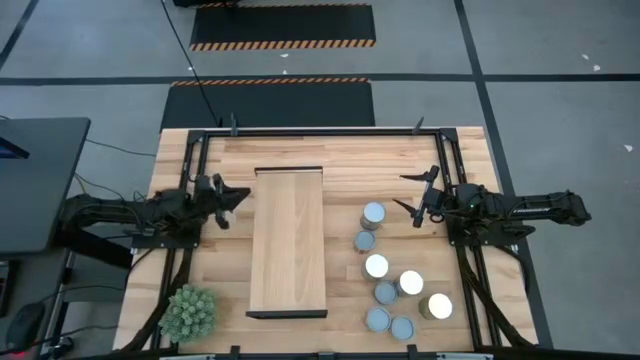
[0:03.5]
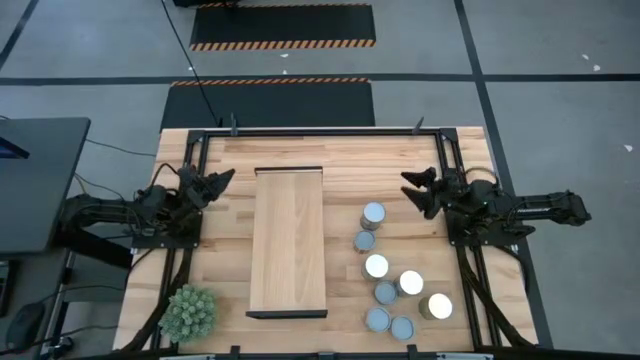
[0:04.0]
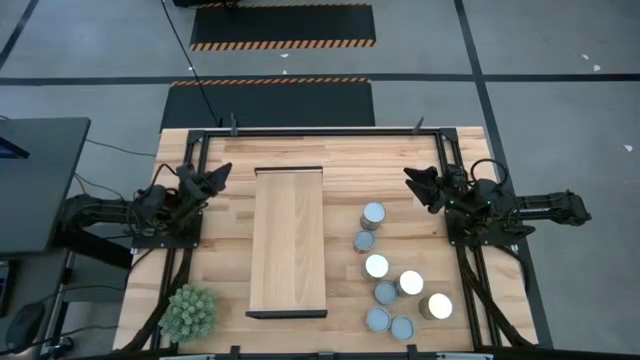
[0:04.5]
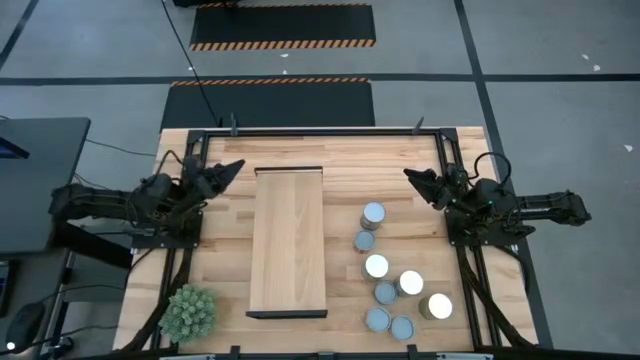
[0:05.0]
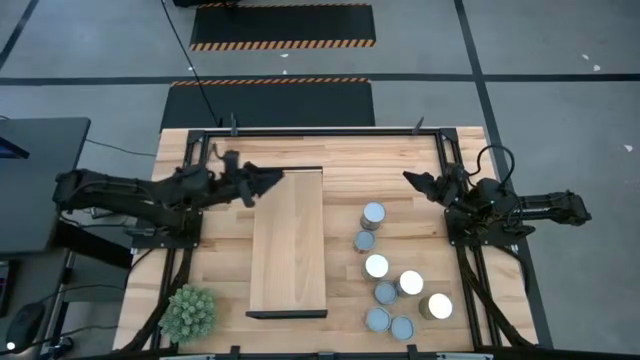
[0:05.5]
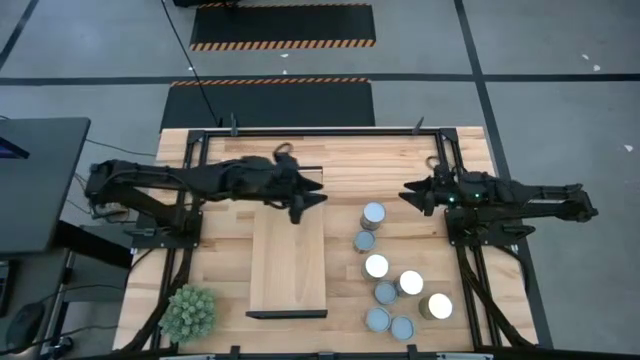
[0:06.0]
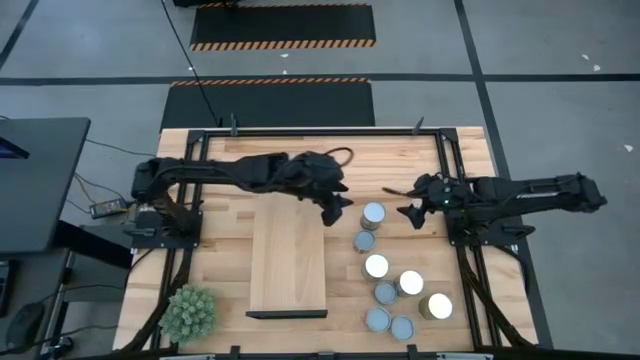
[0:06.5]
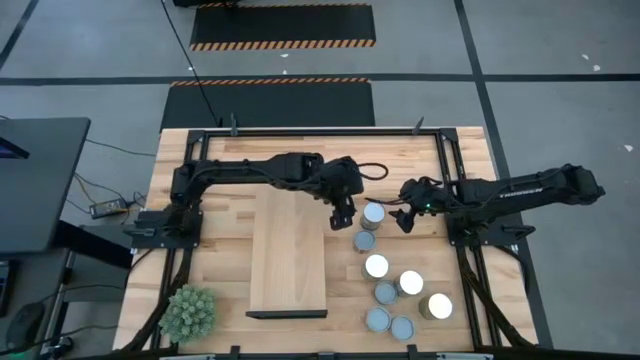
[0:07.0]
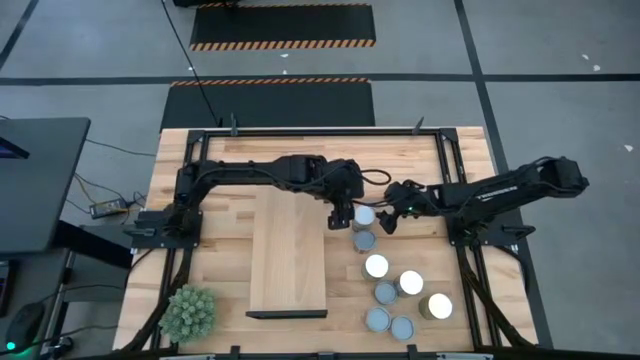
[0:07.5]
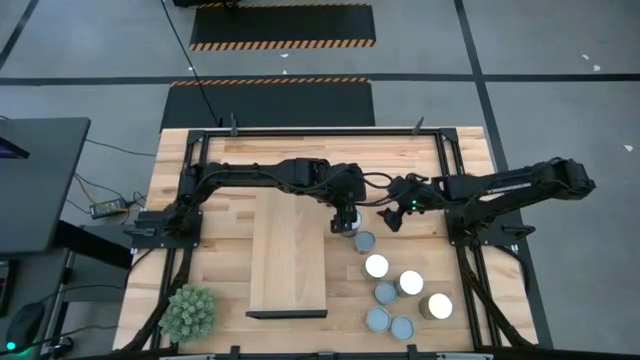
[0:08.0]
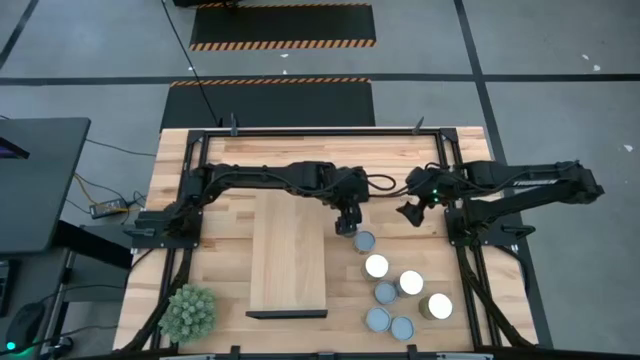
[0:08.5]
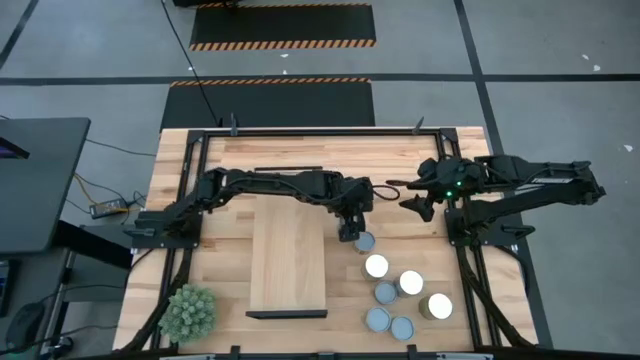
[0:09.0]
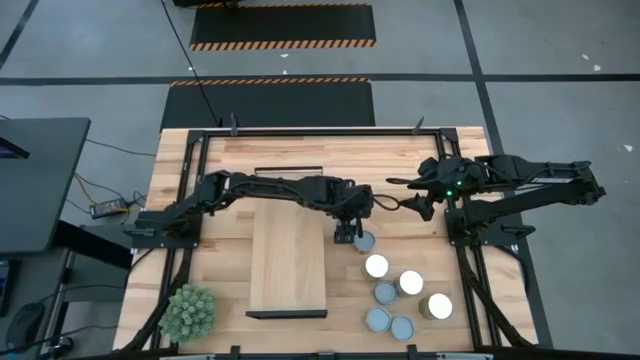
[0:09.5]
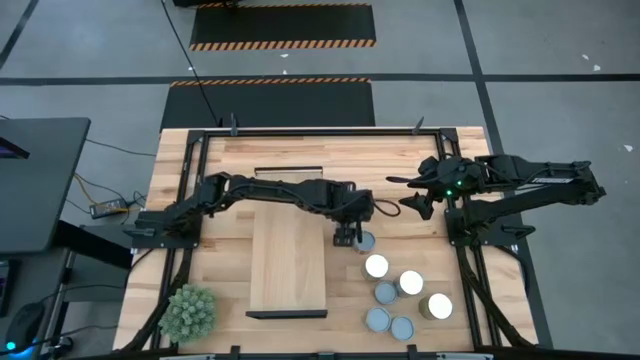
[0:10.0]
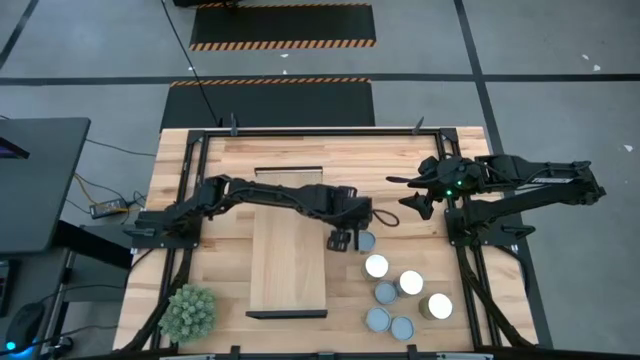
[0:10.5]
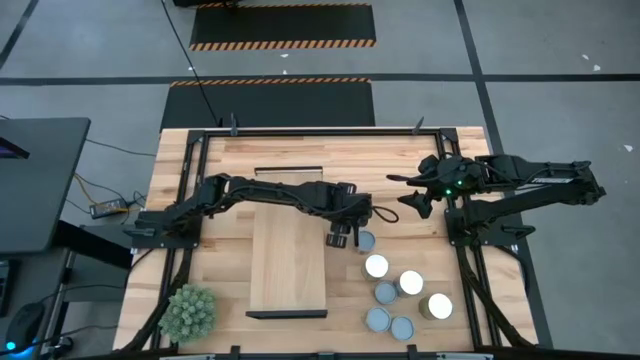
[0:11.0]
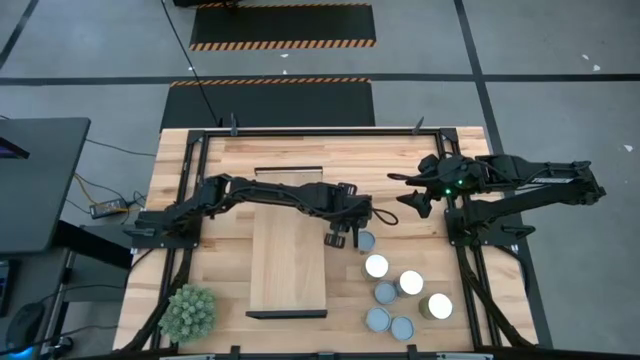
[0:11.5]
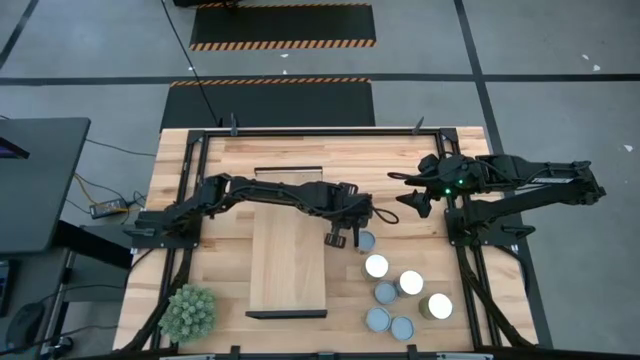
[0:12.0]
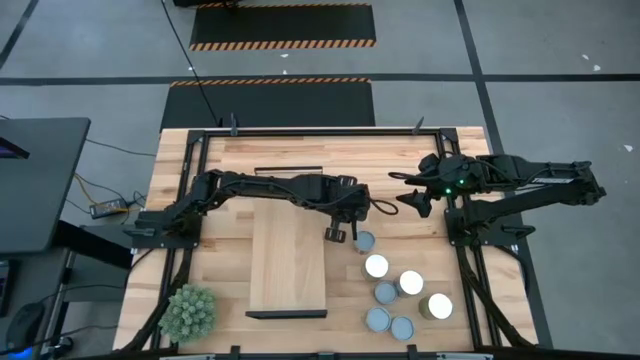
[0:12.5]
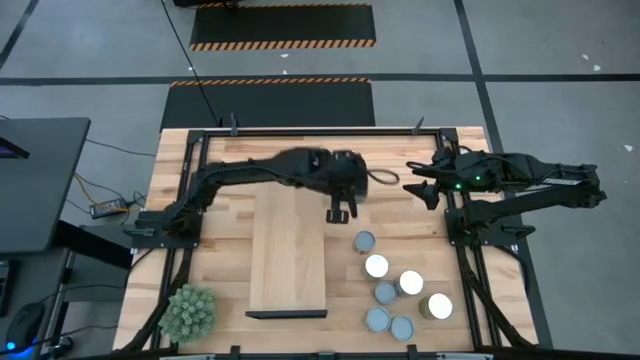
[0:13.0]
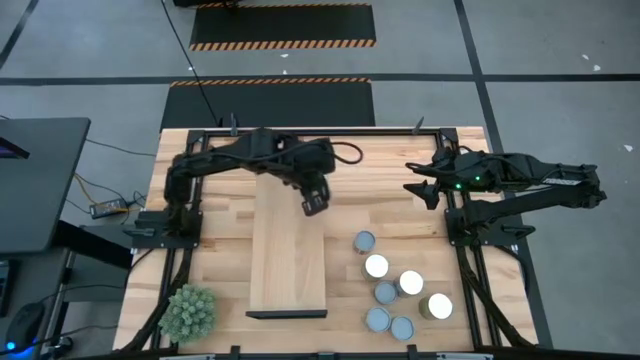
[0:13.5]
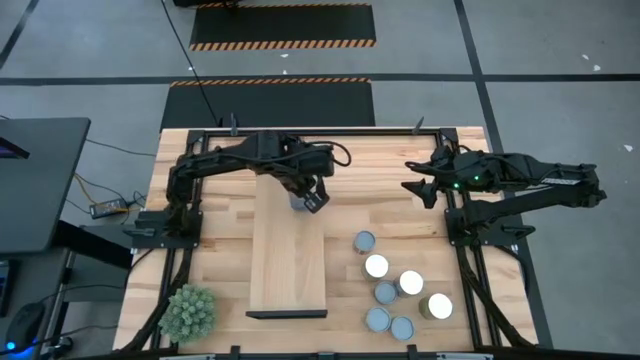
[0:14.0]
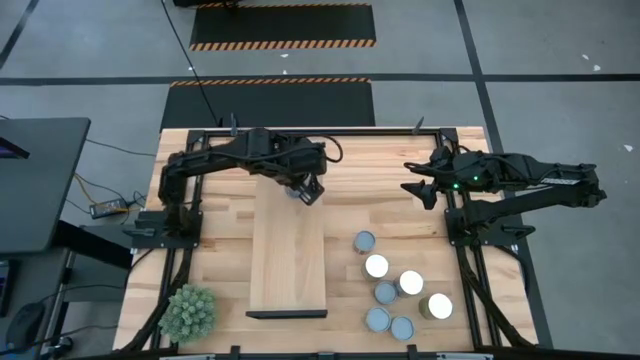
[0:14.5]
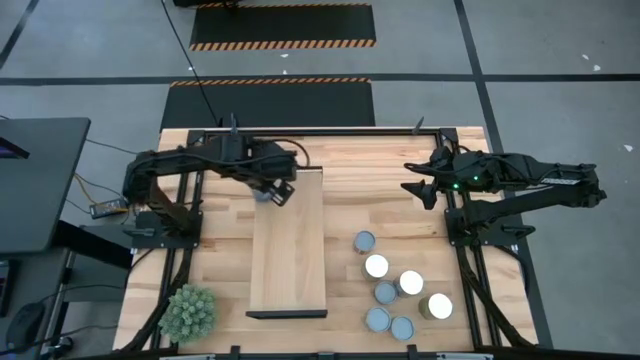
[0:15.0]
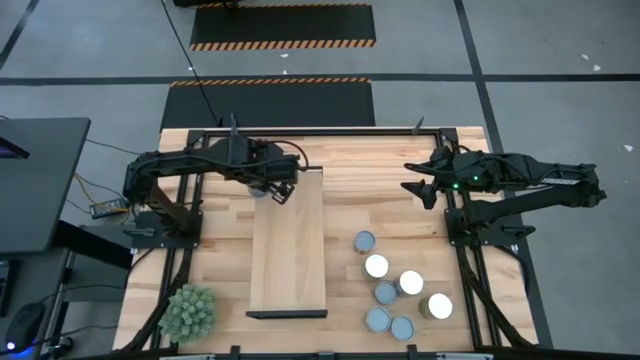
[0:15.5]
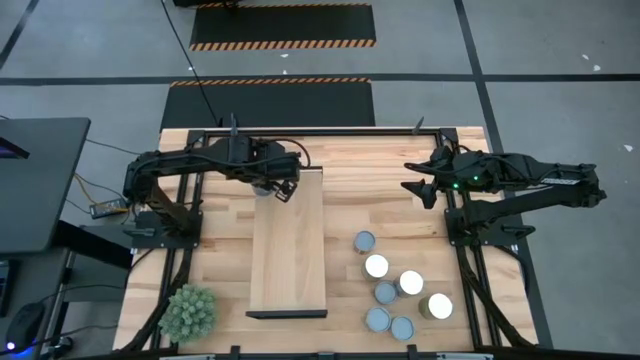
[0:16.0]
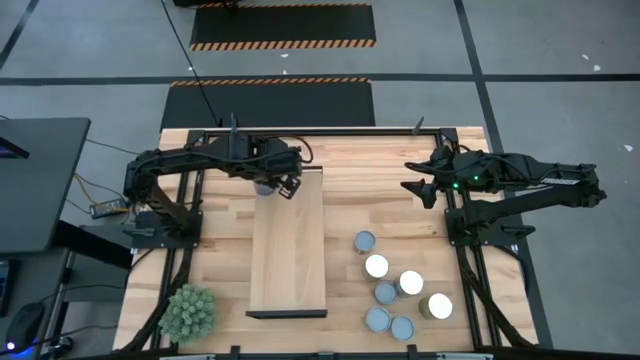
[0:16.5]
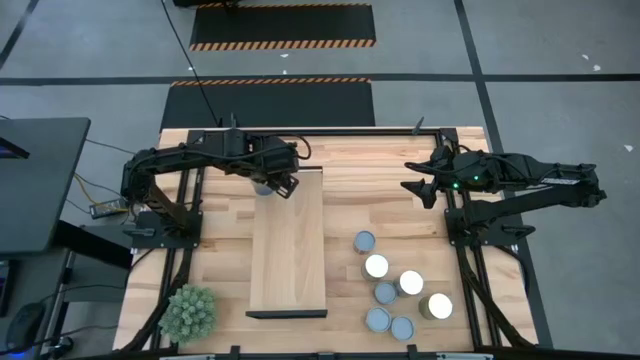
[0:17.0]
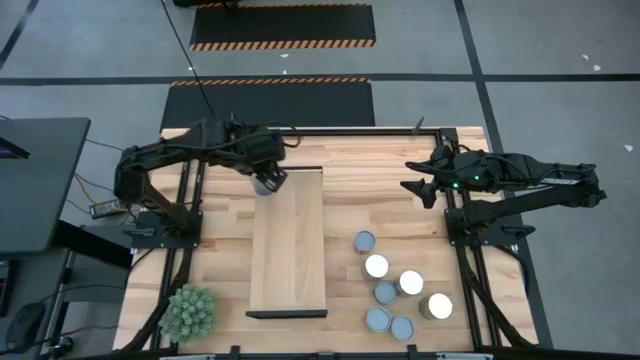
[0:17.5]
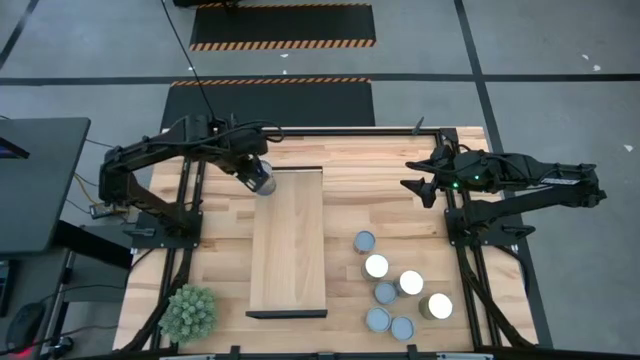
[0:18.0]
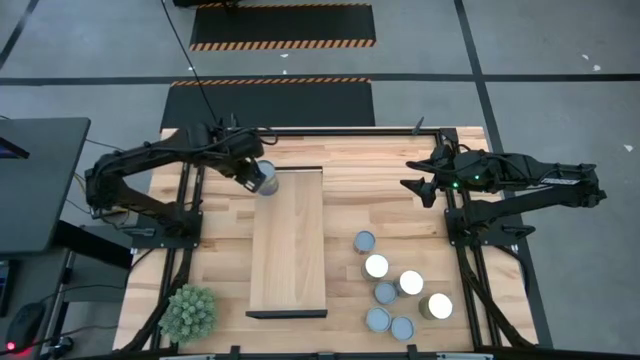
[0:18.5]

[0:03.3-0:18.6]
Task: Pick and place cans onto a shelf
Put the canned peas on the shelf

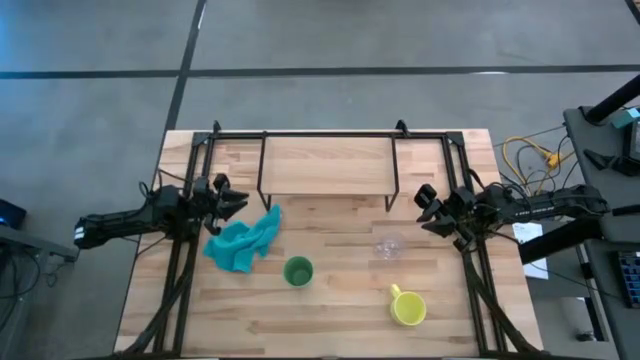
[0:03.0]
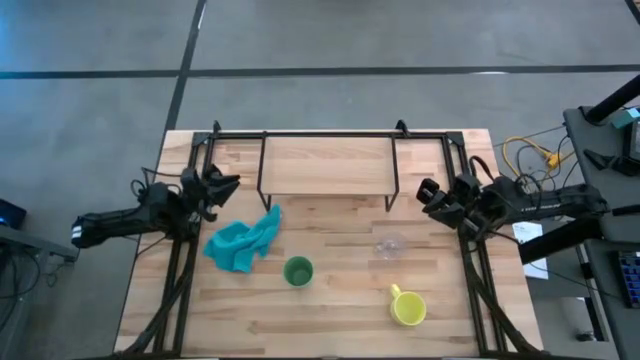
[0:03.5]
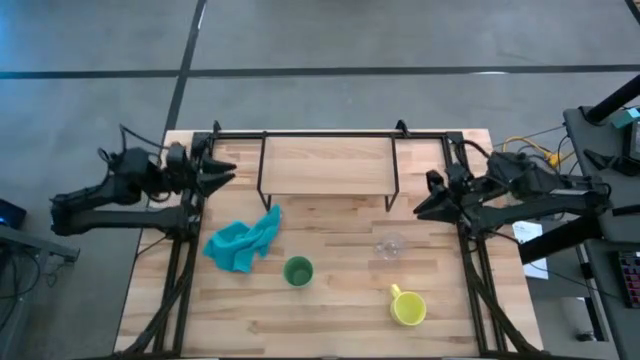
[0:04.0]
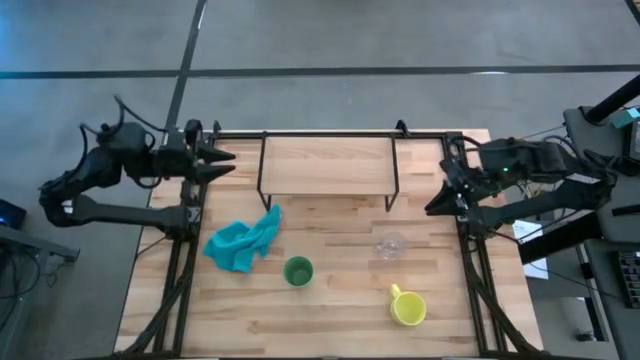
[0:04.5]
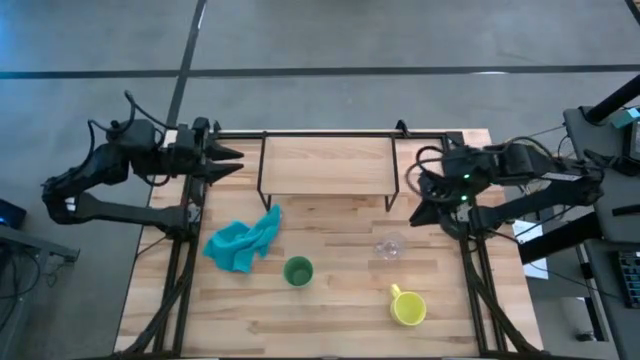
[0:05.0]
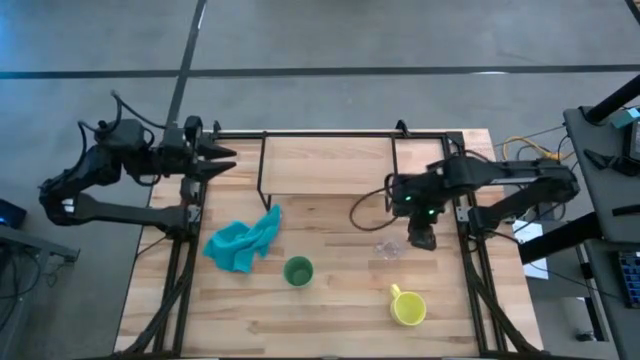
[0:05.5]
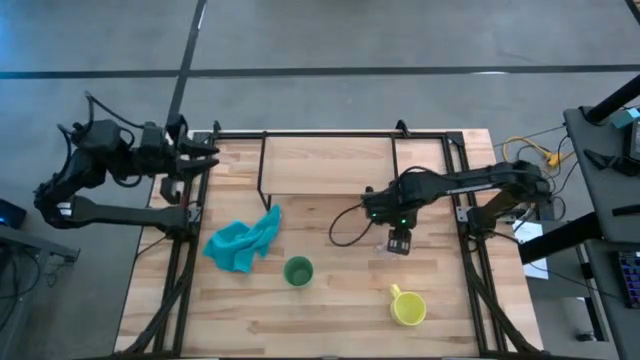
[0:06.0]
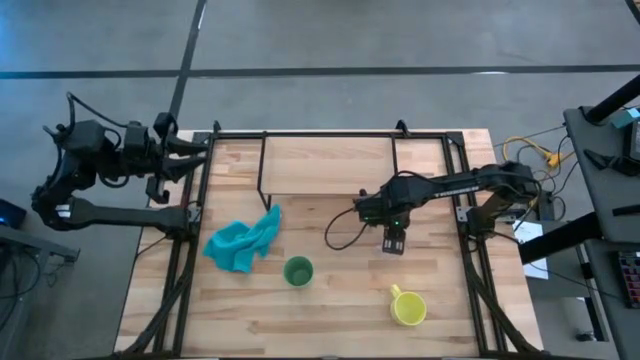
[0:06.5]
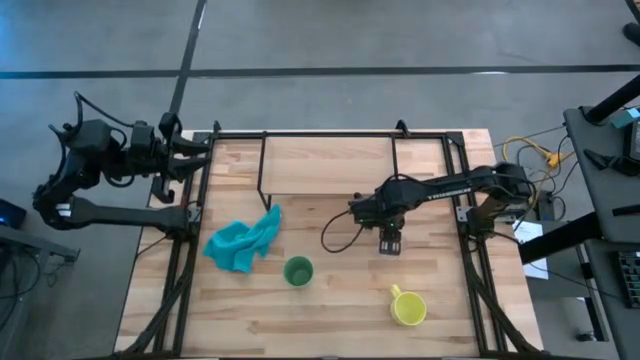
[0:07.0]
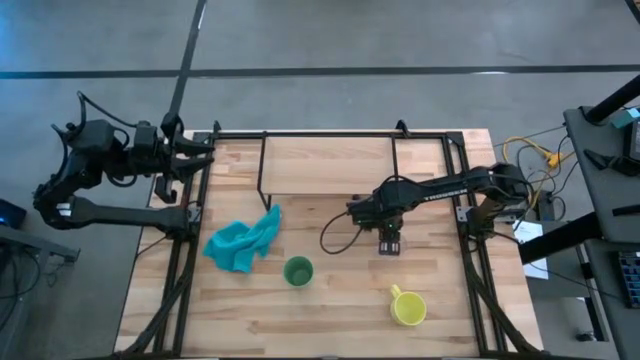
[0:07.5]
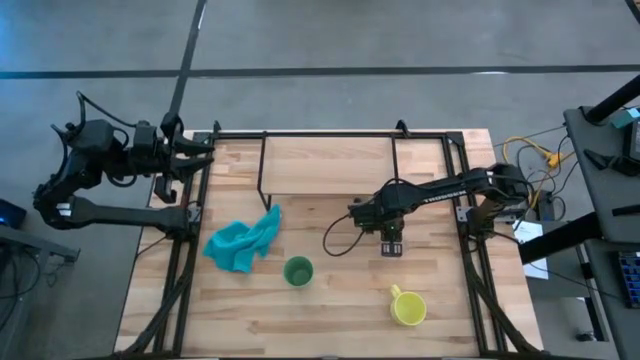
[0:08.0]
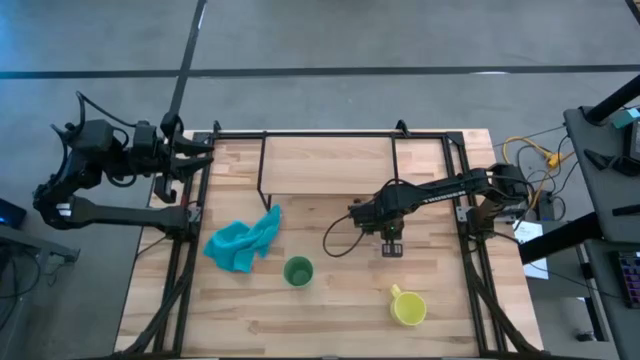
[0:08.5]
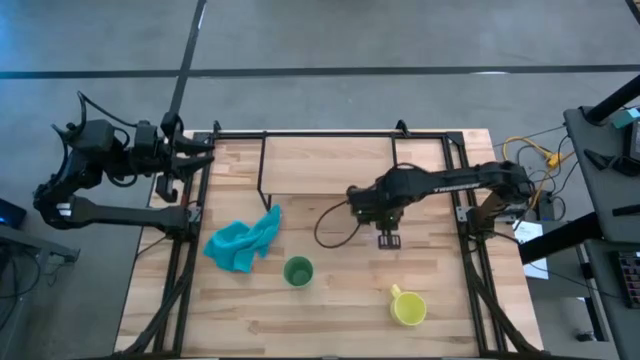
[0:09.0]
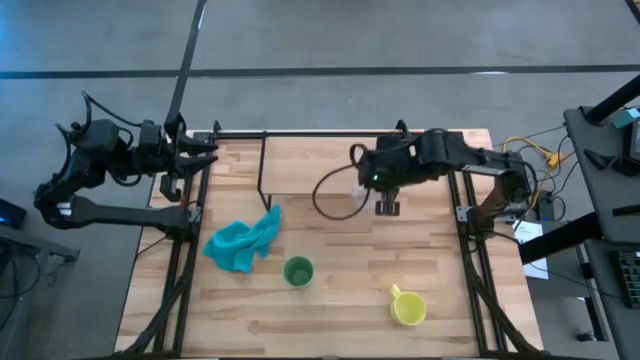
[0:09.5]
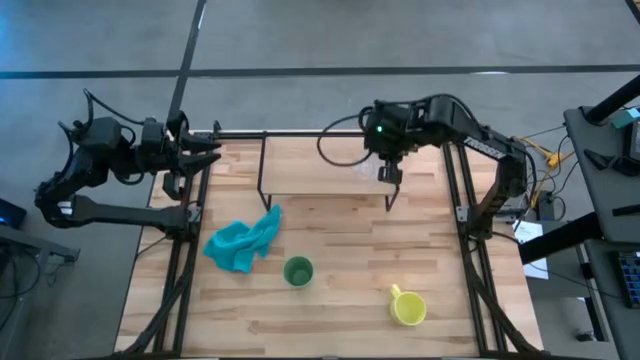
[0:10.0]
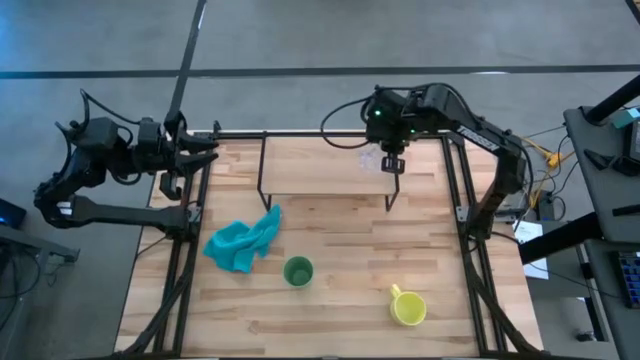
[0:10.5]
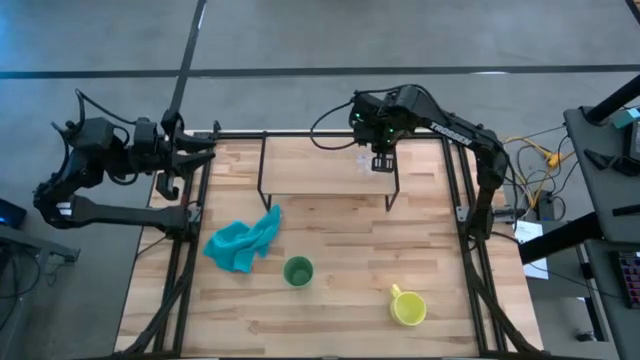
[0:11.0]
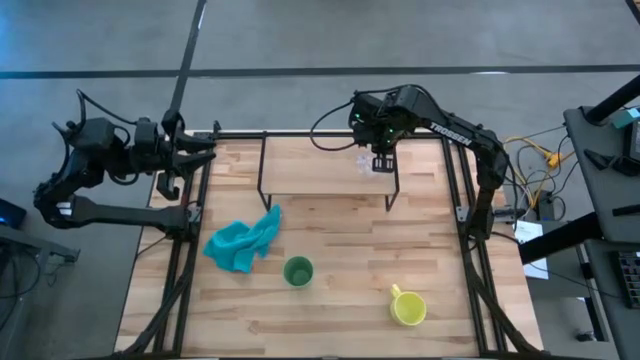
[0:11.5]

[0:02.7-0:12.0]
Task: Stack small to large cups/mugs on shelf
Put the transparent mug on the shelf
